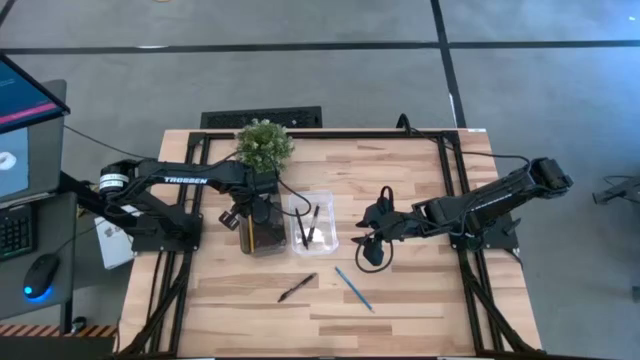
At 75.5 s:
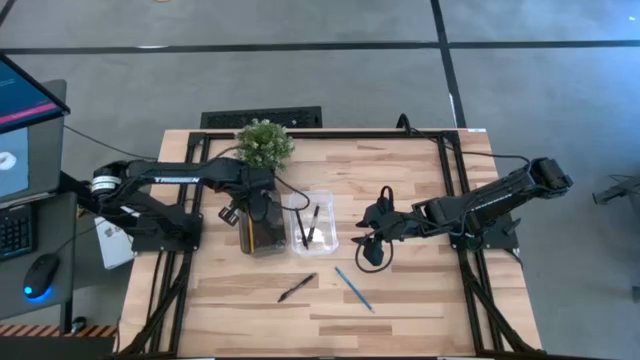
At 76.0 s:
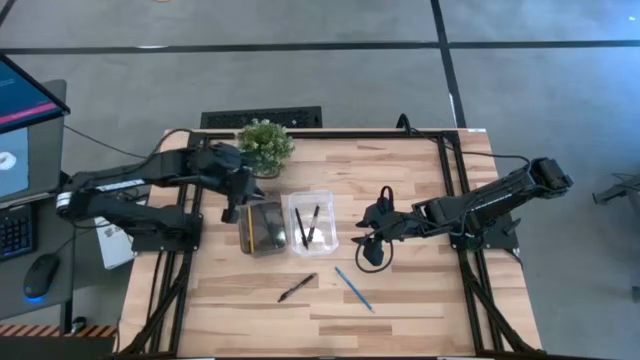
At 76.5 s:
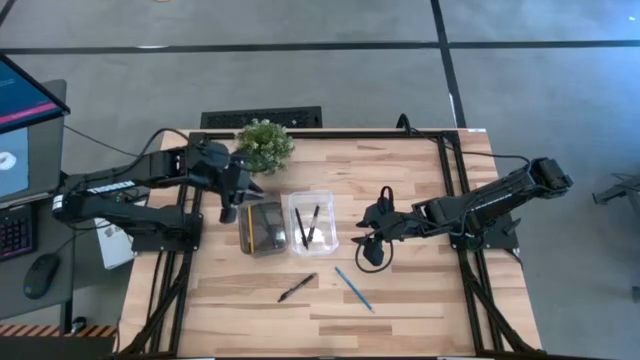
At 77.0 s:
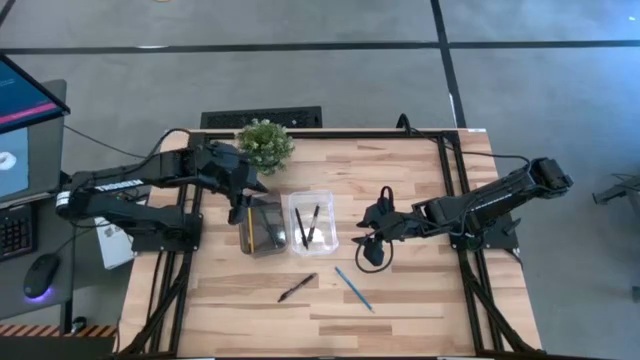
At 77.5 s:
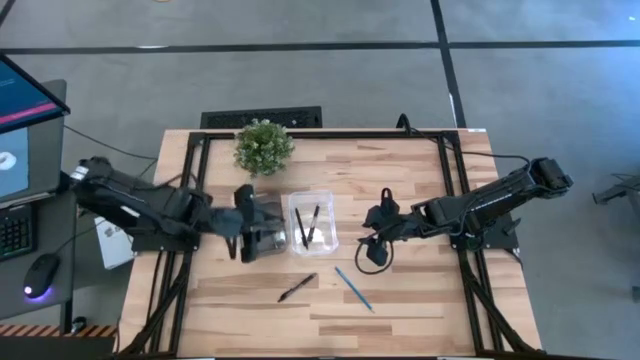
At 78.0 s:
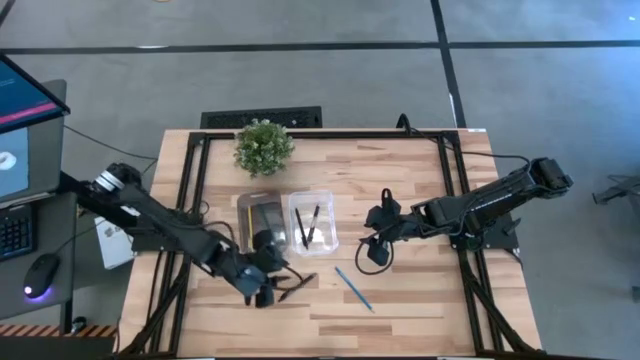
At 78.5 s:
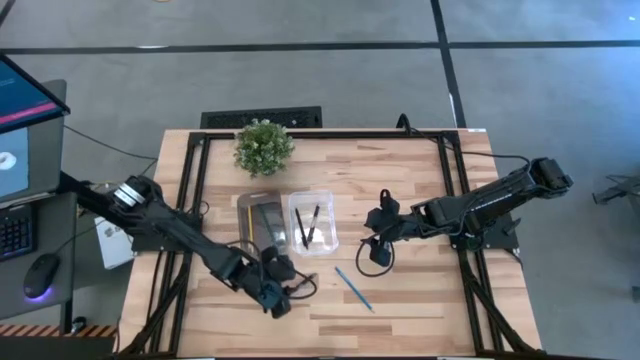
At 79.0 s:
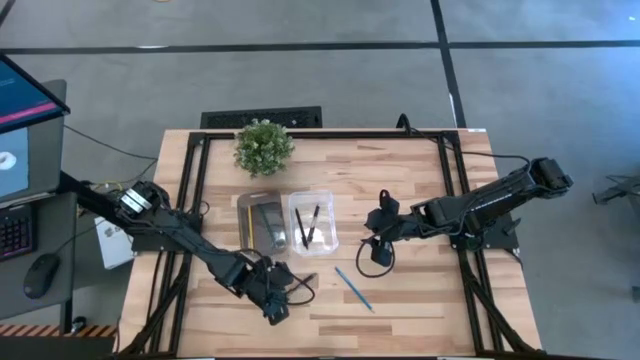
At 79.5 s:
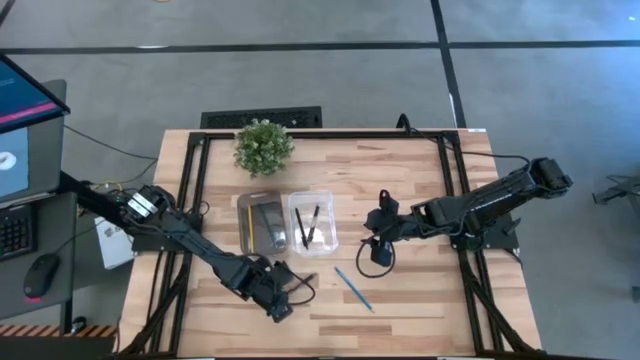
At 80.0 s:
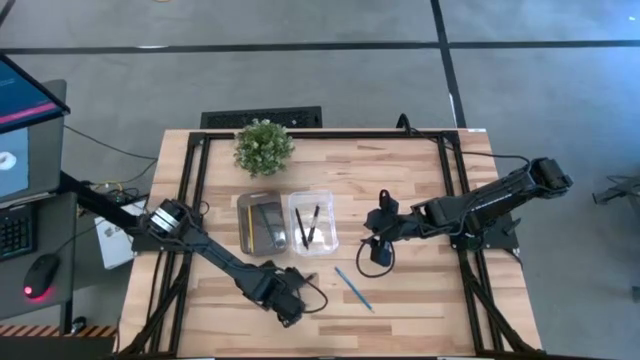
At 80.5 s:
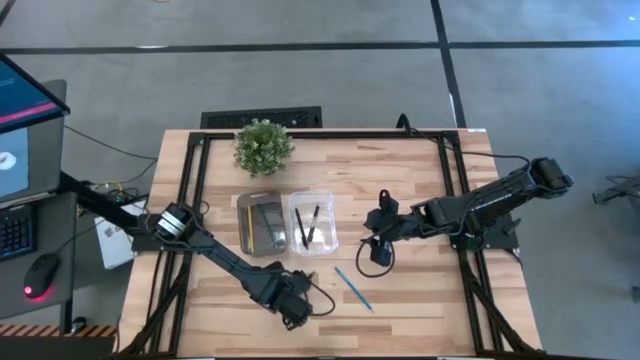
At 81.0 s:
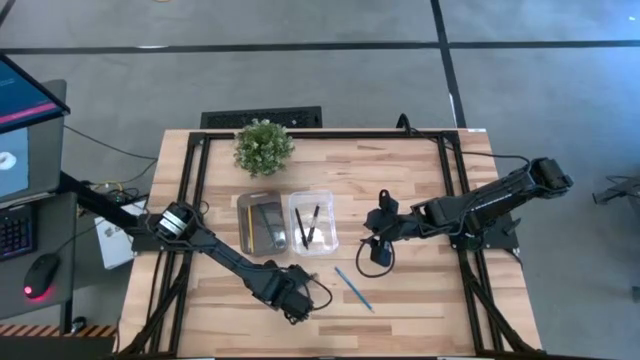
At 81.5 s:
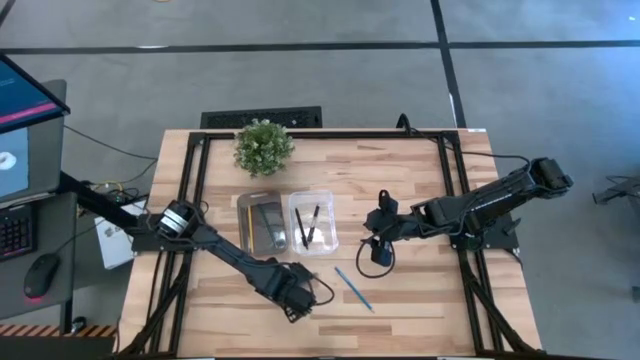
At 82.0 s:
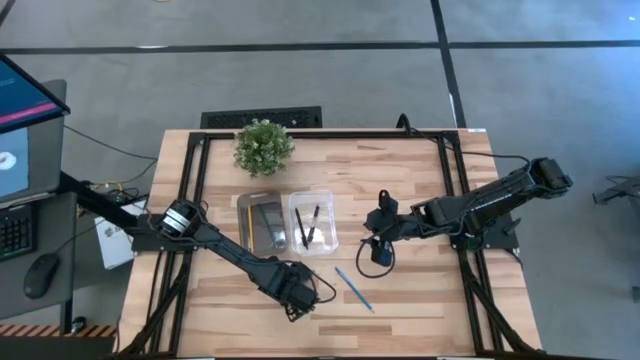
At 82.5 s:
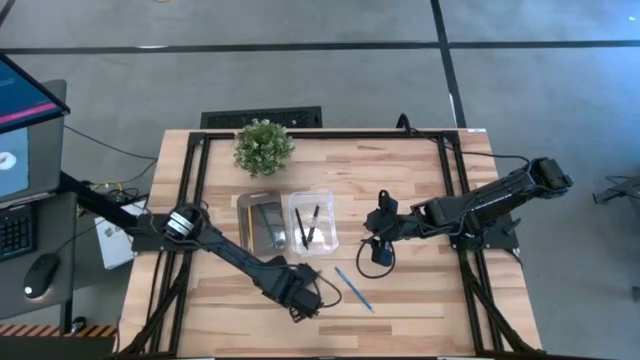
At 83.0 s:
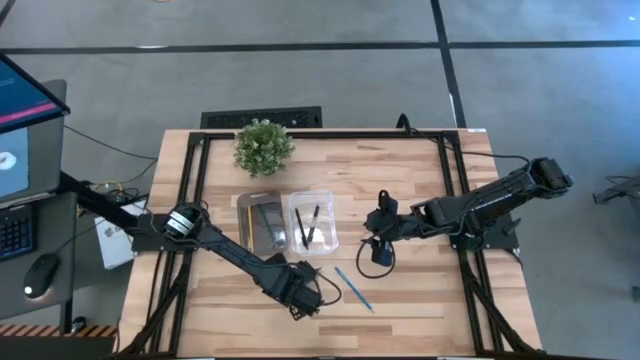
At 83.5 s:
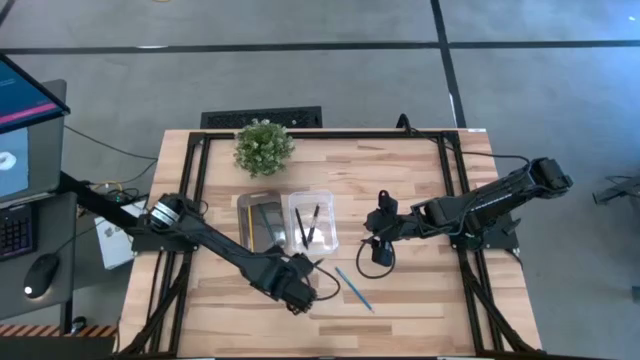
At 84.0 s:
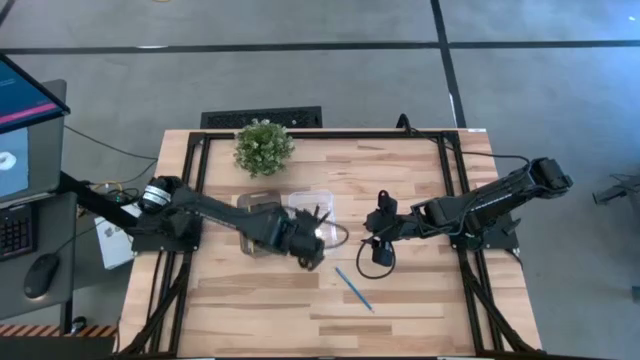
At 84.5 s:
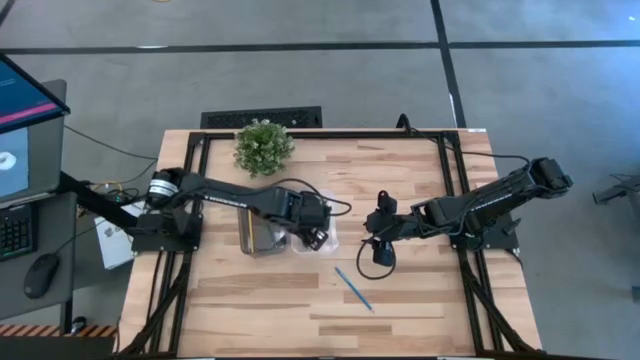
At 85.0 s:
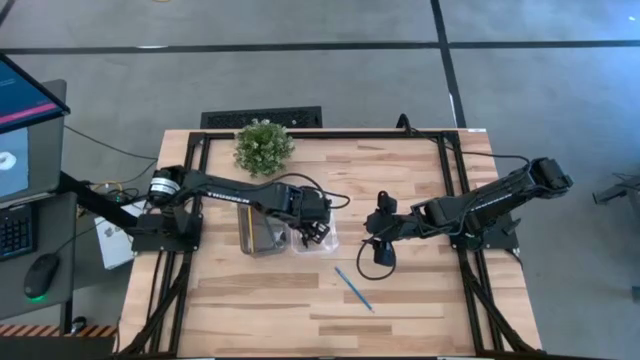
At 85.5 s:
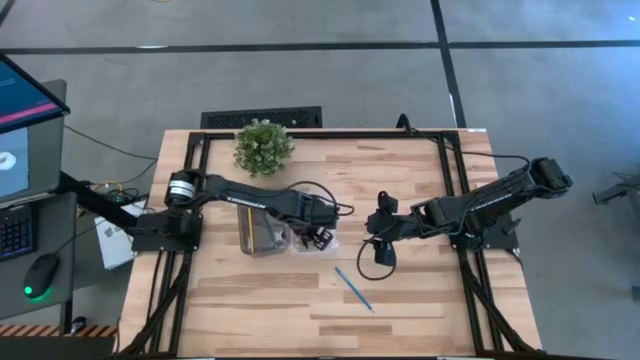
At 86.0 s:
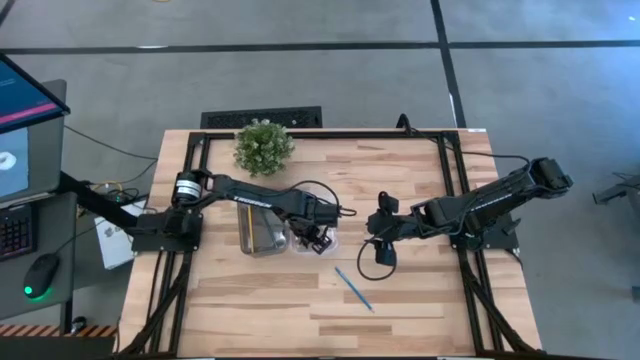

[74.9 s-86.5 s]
Task: Sort pens & pencils
Put the black-white pen into the transparent bin

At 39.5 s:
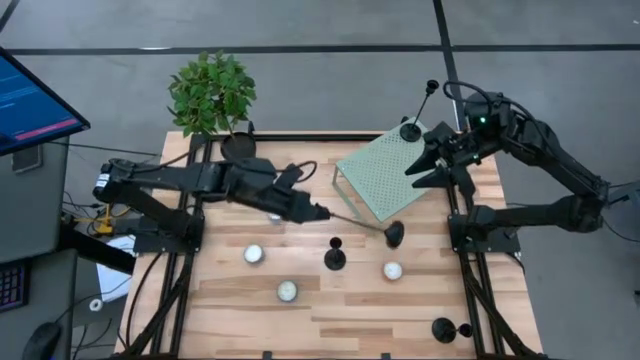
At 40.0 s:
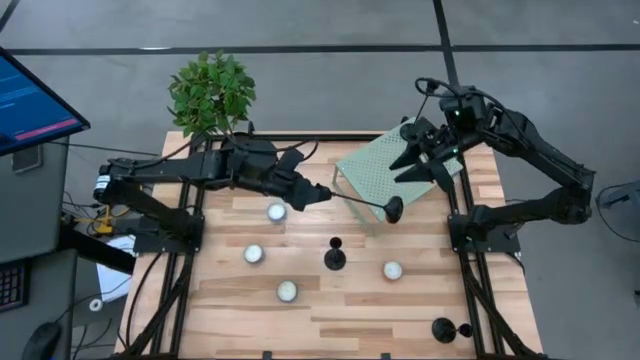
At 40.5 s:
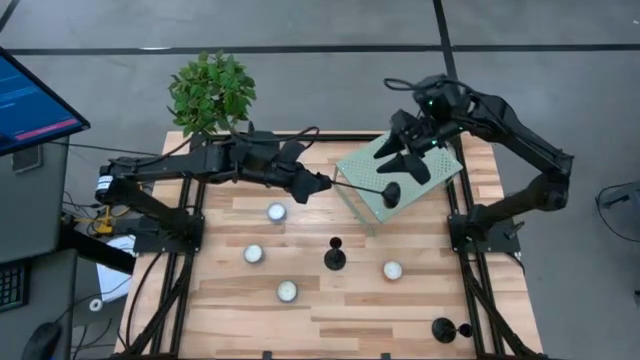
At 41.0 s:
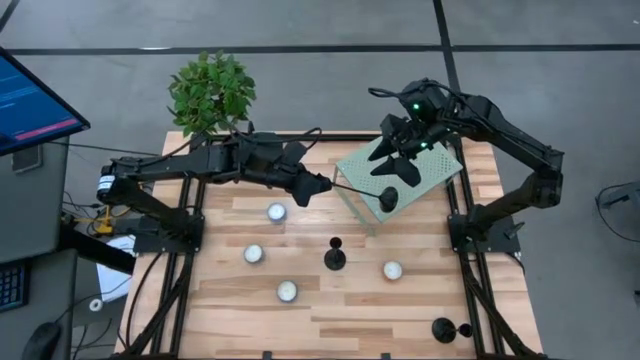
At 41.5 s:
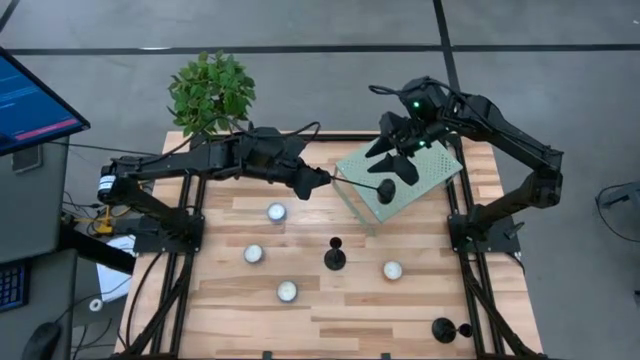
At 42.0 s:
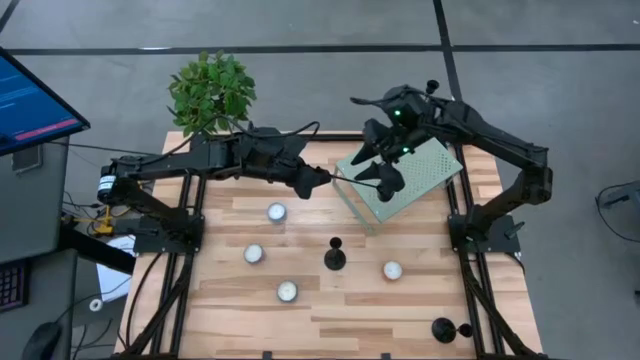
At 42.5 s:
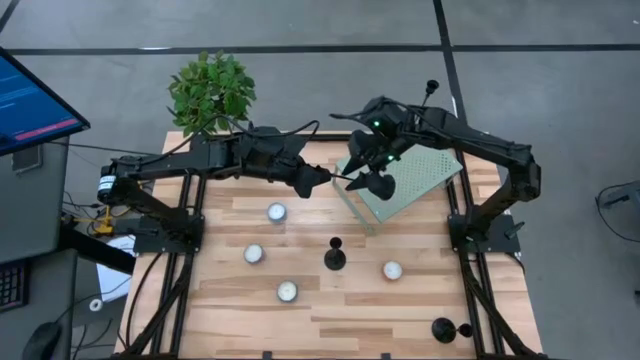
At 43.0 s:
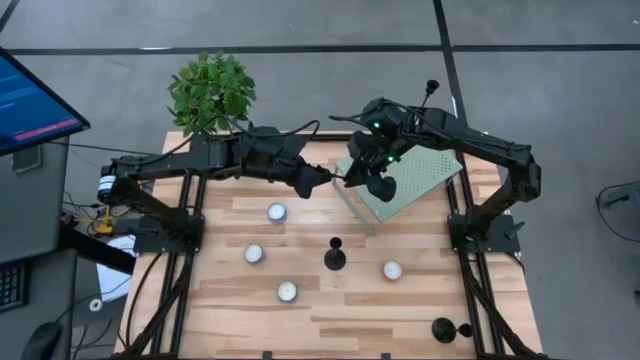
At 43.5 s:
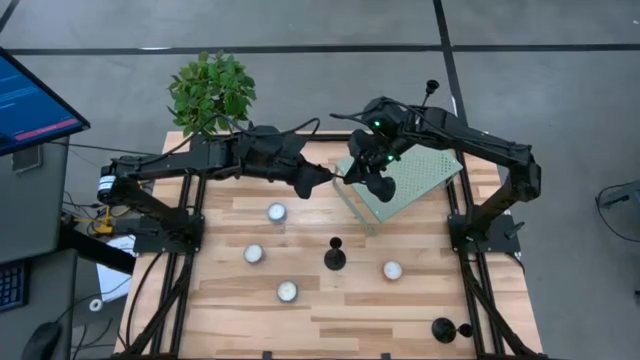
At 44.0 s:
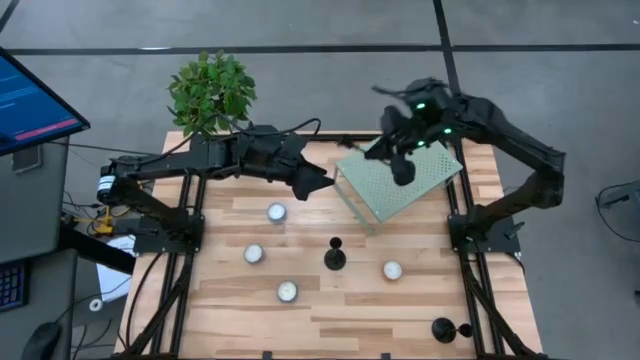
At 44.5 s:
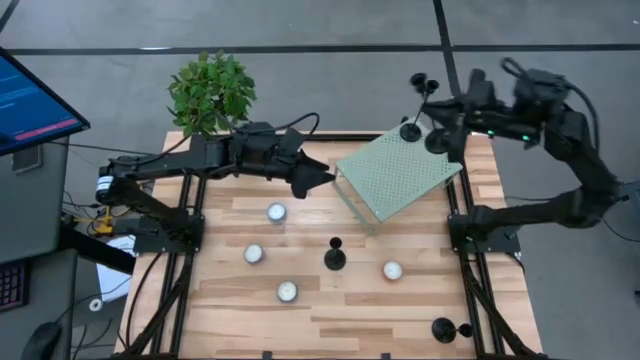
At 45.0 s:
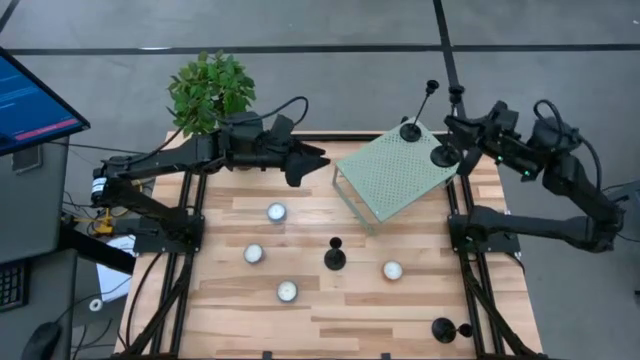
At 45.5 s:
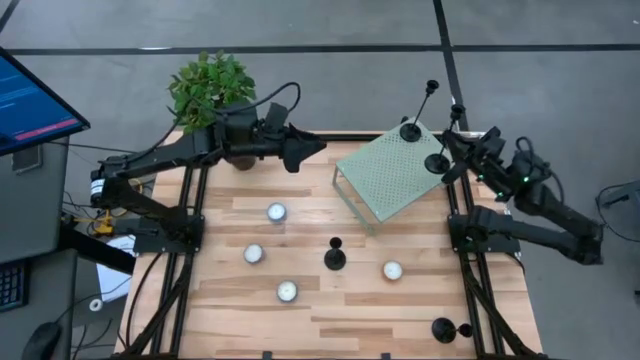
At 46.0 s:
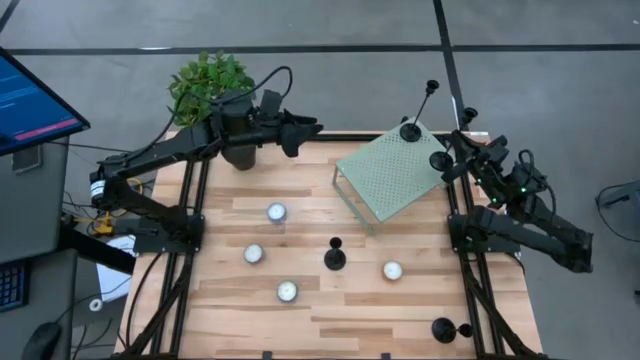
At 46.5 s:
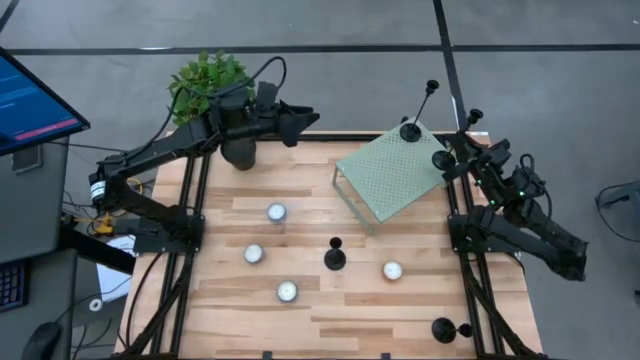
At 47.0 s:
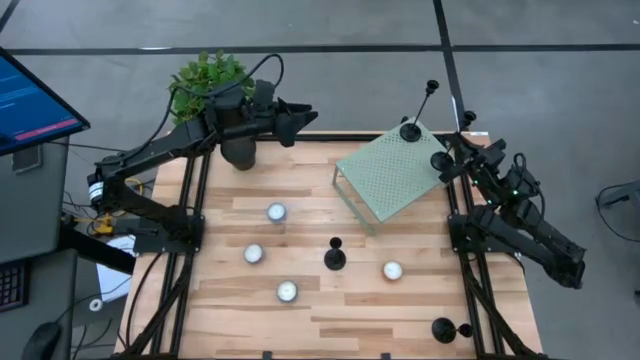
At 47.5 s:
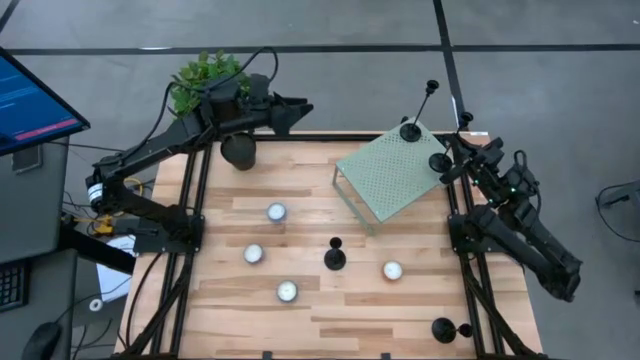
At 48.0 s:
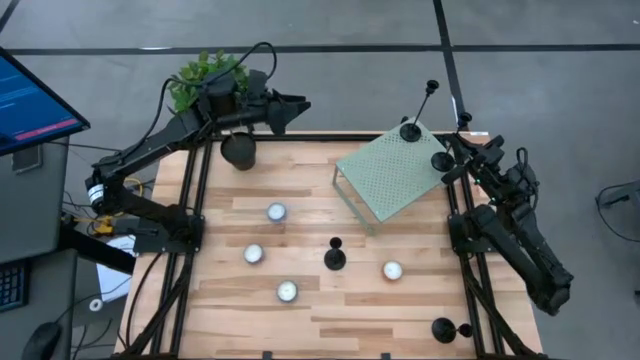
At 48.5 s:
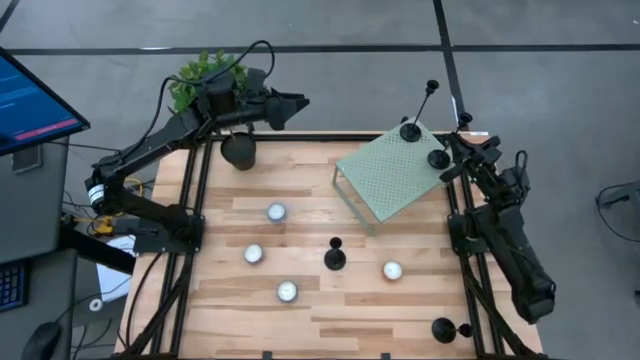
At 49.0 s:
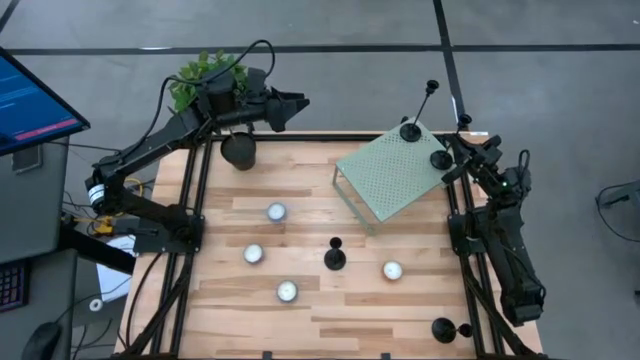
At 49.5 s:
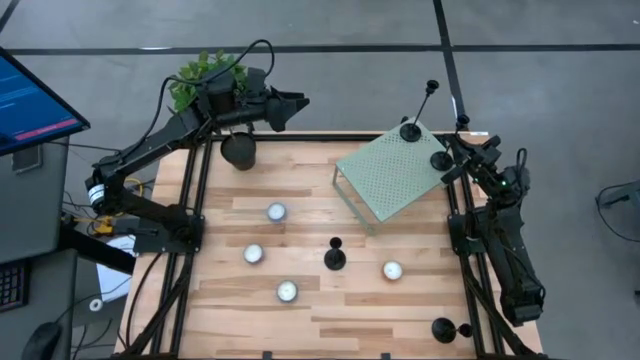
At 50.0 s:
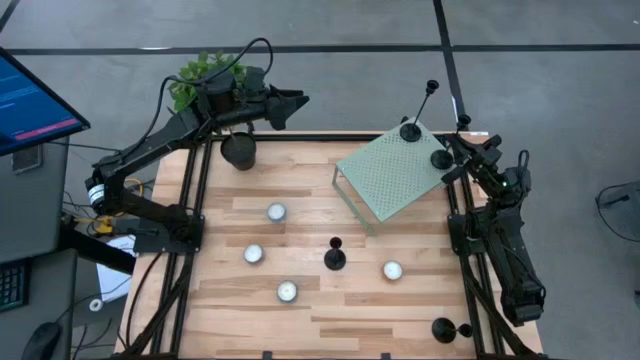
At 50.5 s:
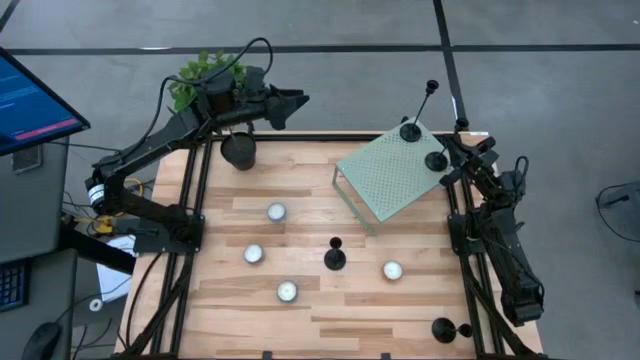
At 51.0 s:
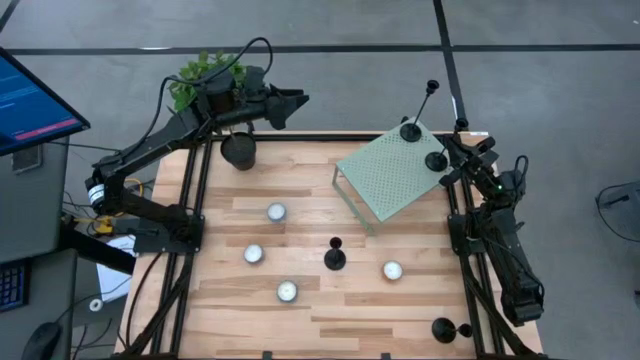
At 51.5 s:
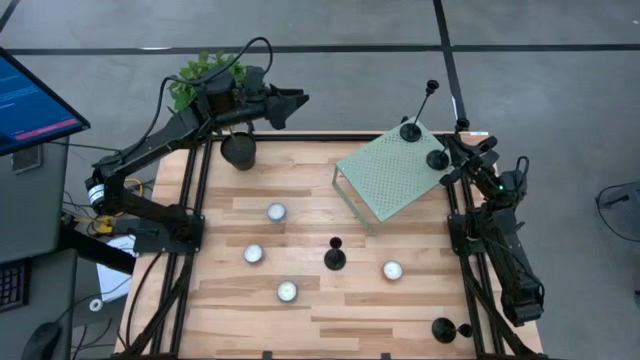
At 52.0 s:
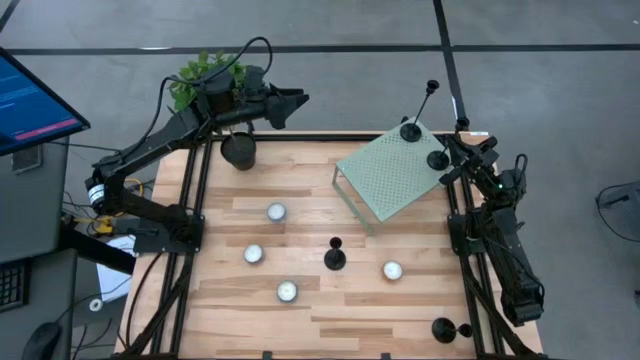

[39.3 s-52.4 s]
Task: Pick & Place candle stick holders
Align the black candle holder with the other black candle holder on the shelf
